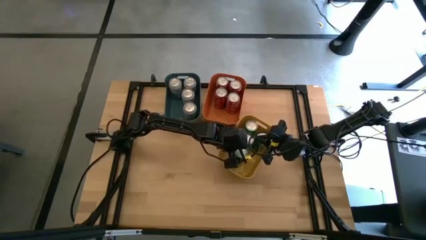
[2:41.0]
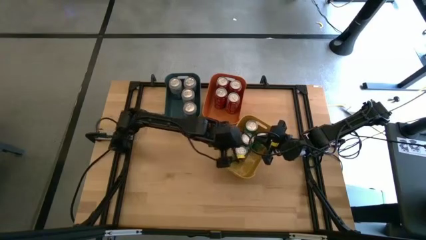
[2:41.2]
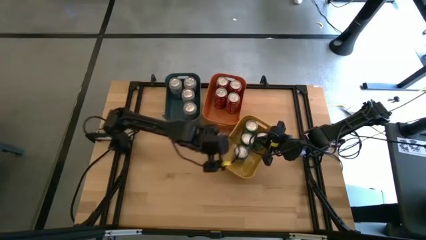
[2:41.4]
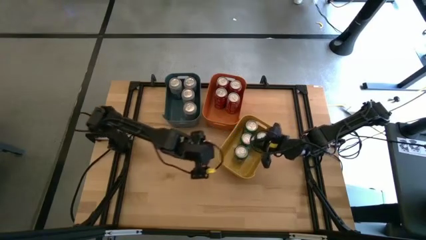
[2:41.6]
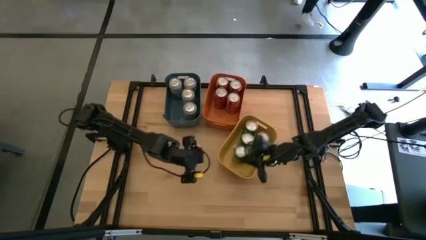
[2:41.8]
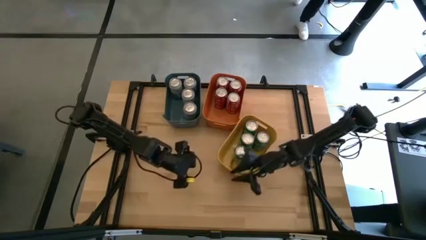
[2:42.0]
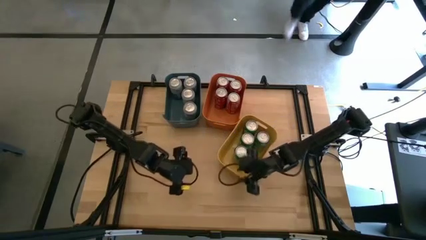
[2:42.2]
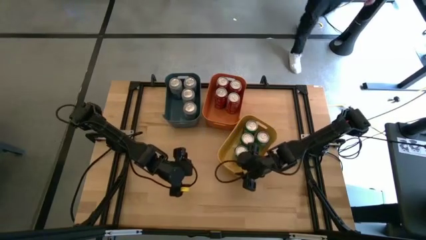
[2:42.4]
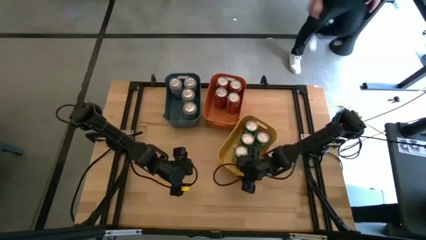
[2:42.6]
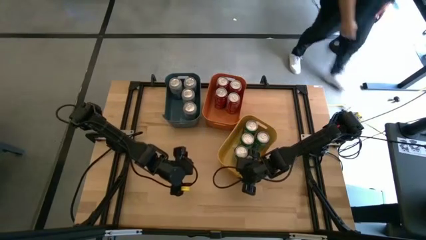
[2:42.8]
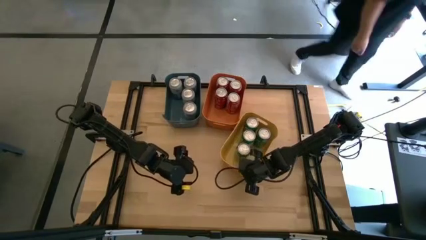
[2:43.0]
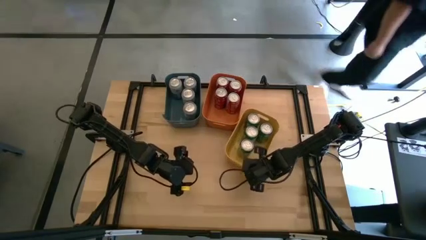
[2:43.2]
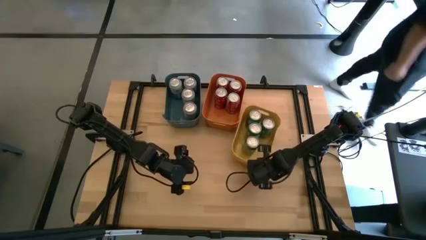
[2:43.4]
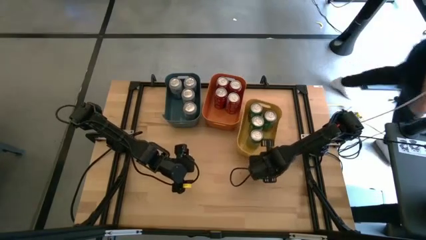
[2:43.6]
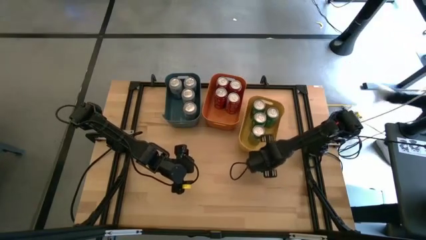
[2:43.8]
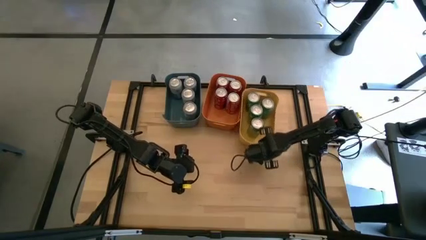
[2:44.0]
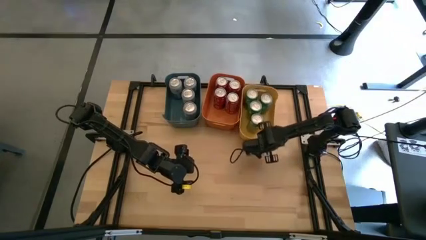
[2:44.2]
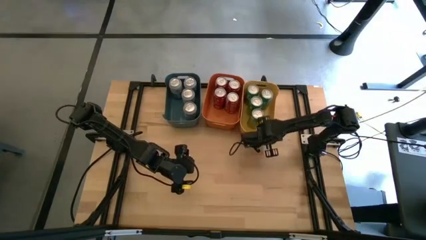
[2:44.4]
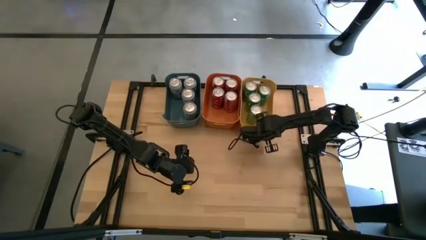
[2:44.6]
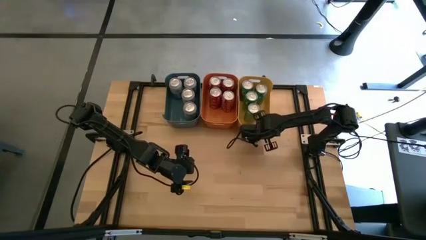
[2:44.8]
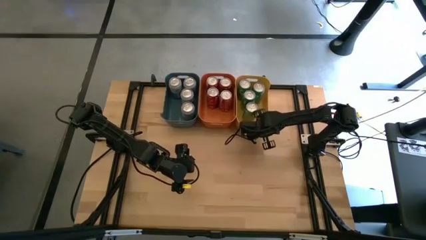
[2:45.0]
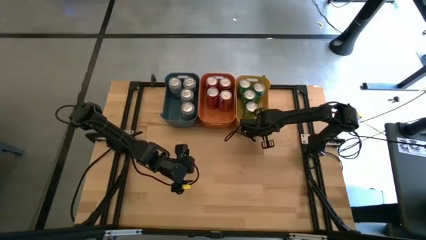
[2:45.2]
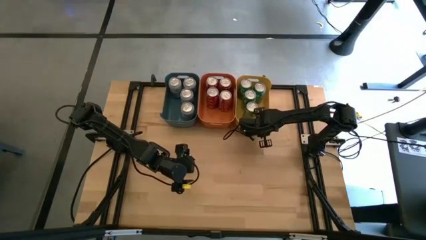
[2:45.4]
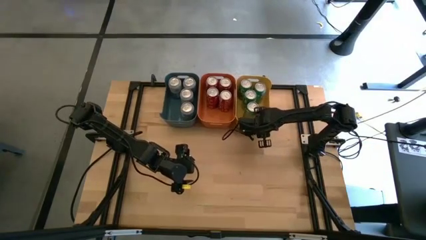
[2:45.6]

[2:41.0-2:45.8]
Task: Sort soda cans
Move the yellow bin to the right of the orange bin

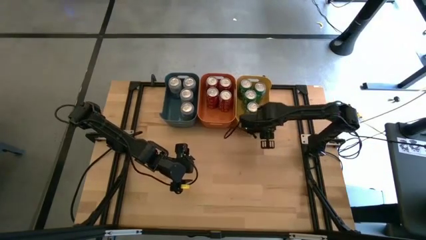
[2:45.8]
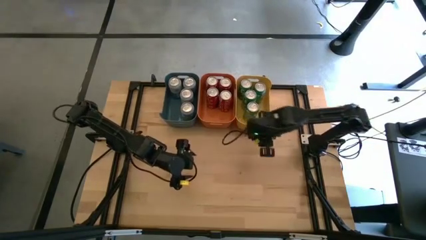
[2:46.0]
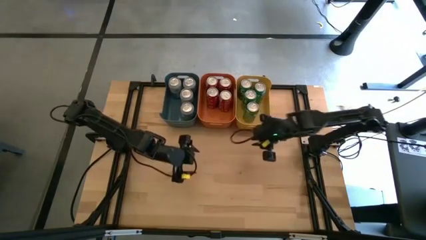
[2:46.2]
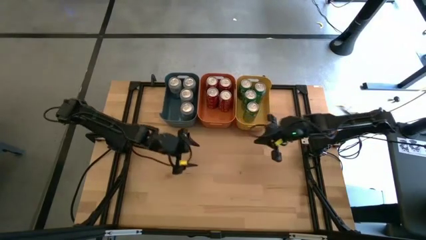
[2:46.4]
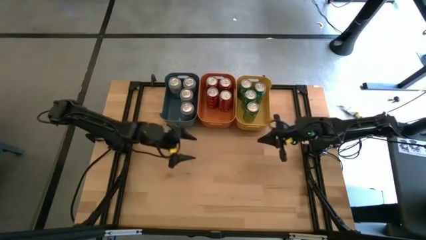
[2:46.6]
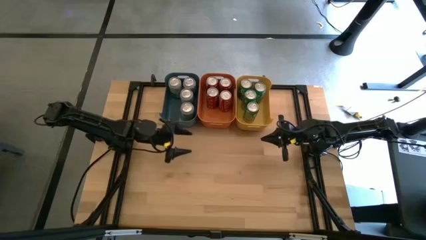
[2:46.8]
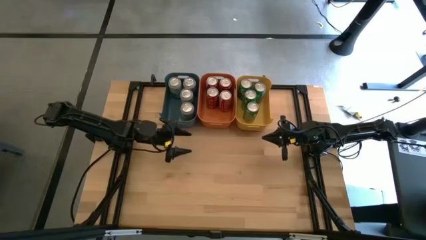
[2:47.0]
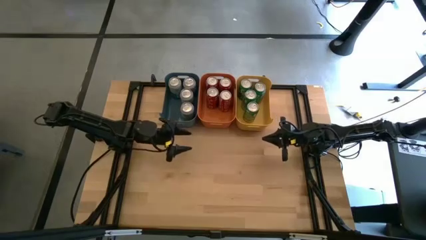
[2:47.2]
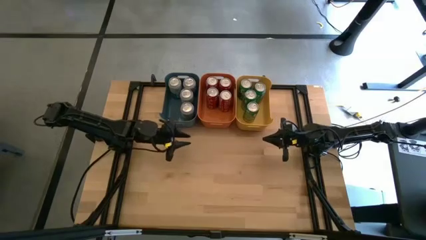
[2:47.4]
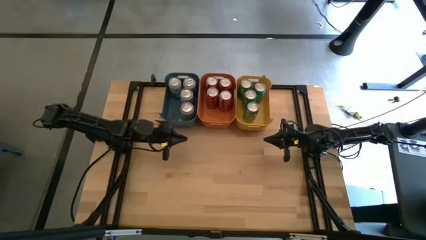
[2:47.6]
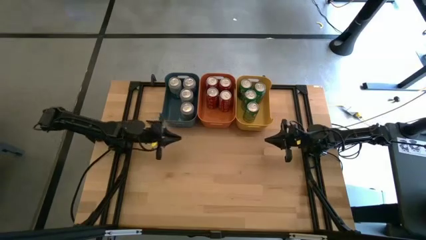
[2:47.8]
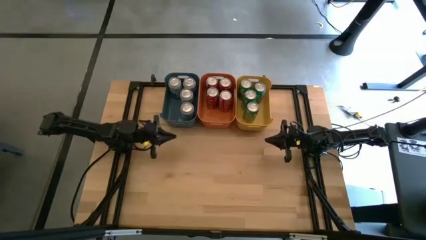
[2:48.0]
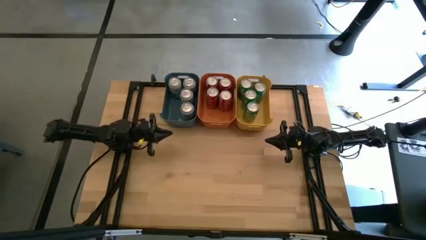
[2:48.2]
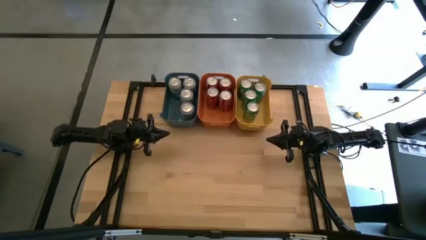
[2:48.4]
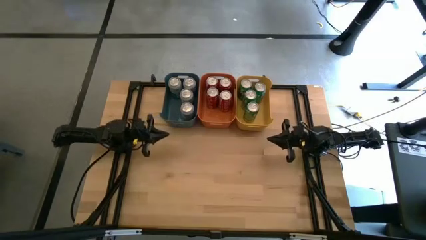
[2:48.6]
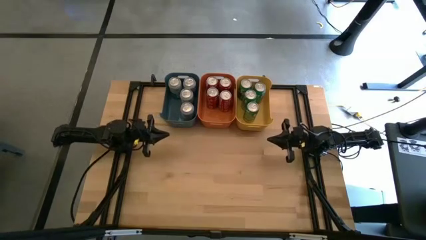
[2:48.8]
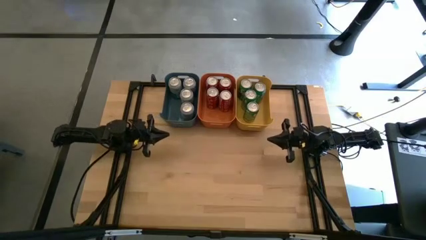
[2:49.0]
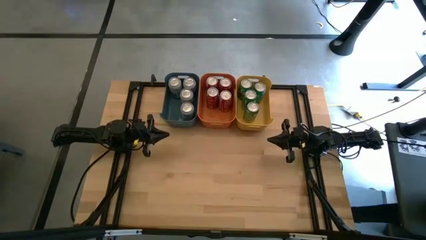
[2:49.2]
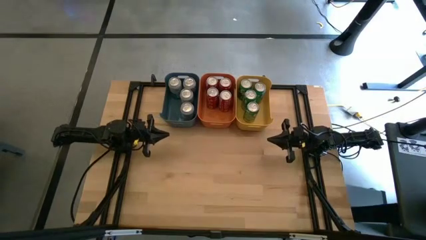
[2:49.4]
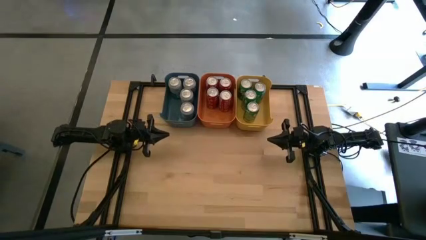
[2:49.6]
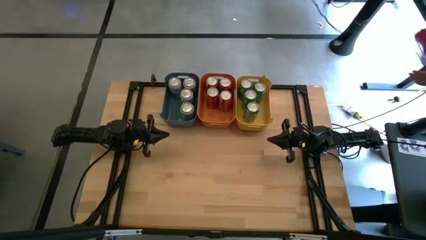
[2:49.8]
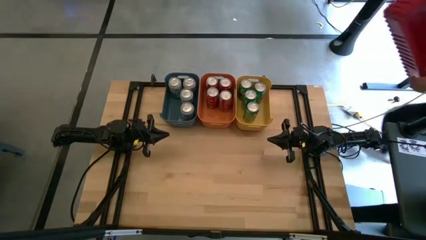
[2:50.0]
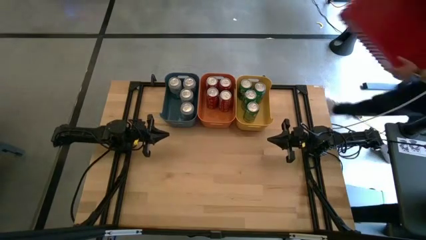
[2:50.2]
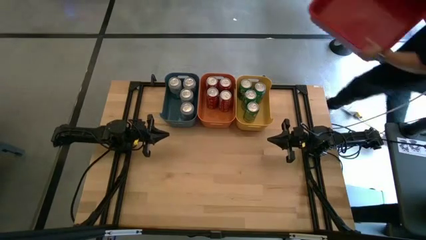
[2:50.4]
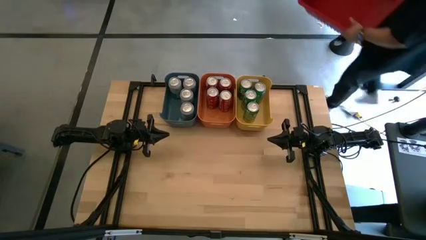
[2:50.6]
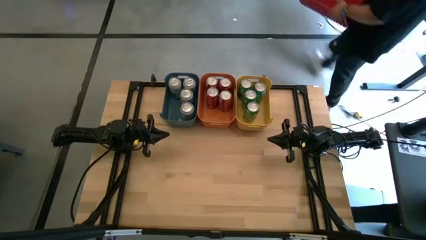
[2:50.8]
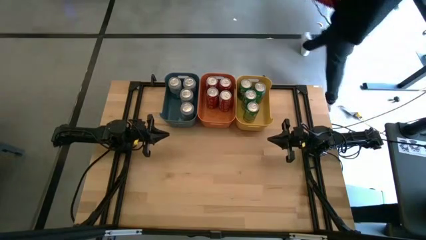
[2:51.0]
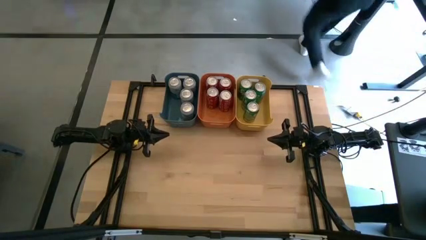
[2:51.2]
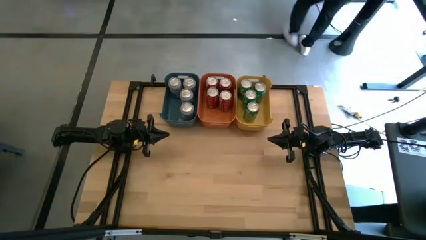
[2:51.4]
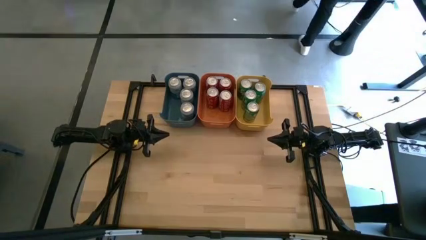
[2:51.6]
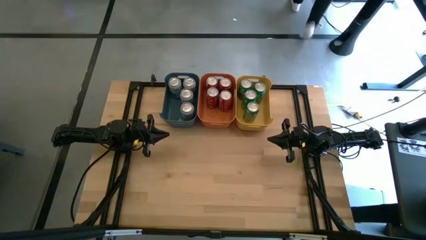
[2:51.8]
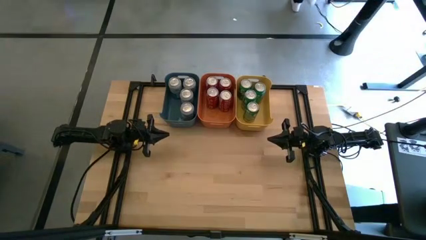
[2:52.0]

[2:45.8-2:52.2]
Return to Home Position

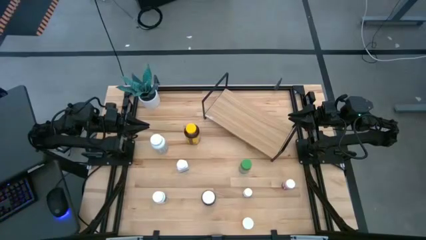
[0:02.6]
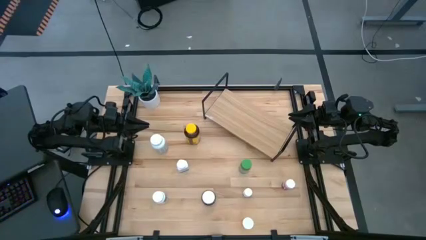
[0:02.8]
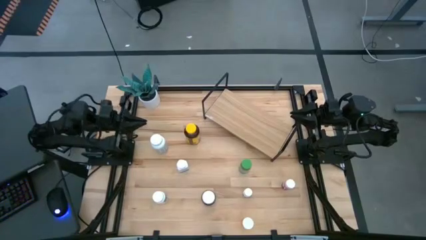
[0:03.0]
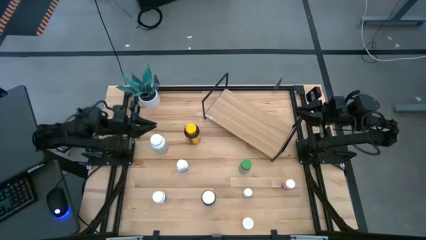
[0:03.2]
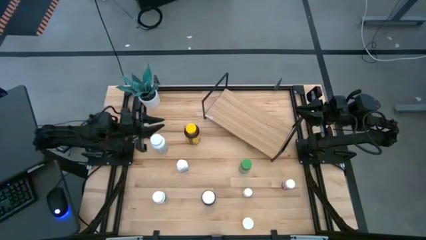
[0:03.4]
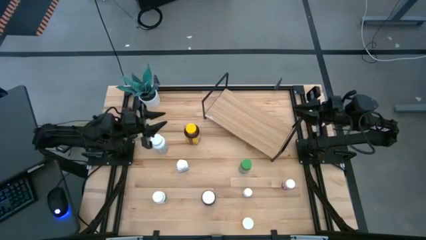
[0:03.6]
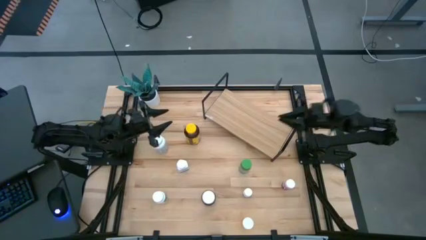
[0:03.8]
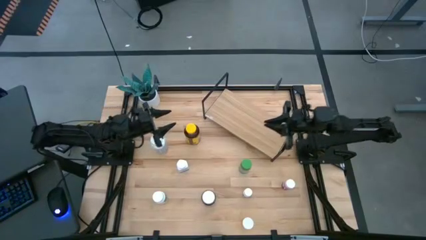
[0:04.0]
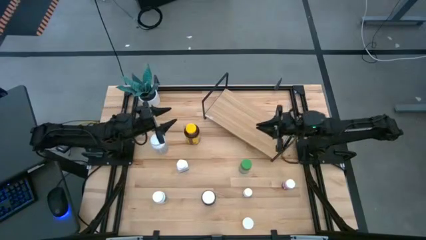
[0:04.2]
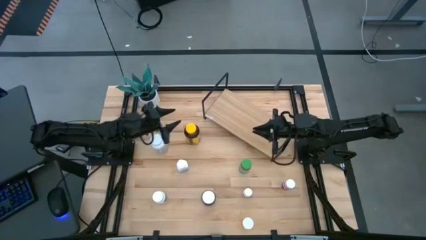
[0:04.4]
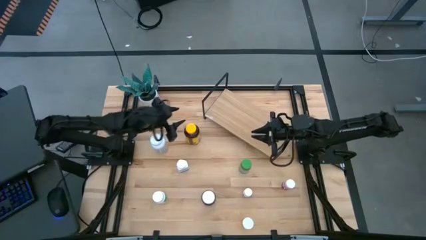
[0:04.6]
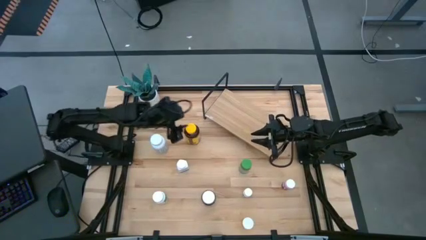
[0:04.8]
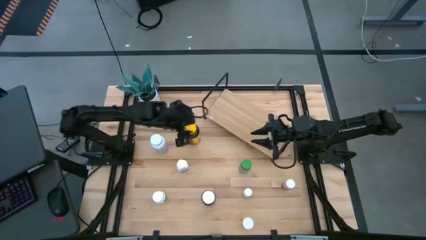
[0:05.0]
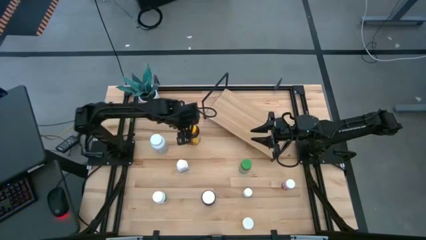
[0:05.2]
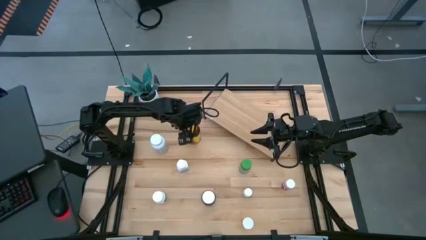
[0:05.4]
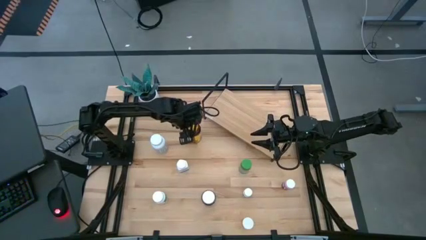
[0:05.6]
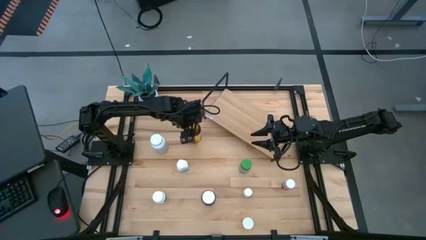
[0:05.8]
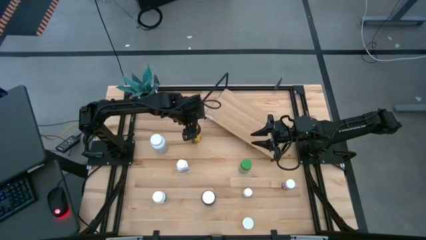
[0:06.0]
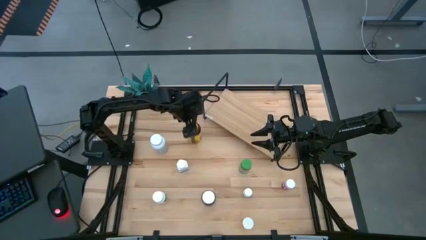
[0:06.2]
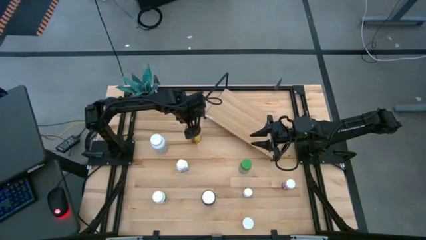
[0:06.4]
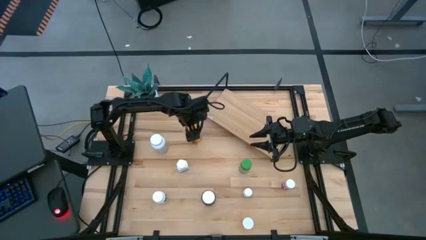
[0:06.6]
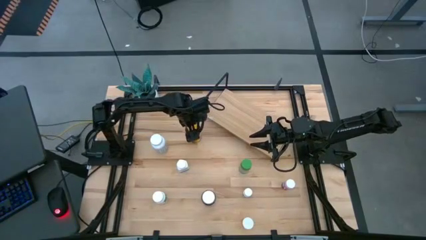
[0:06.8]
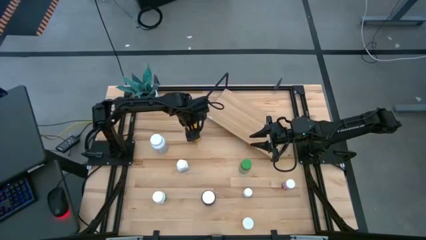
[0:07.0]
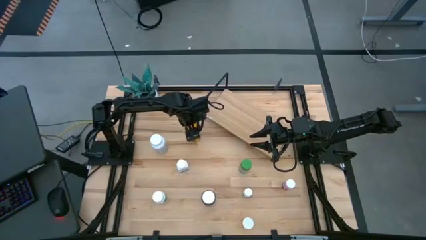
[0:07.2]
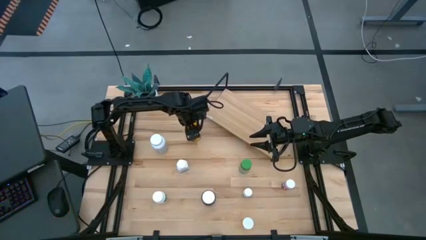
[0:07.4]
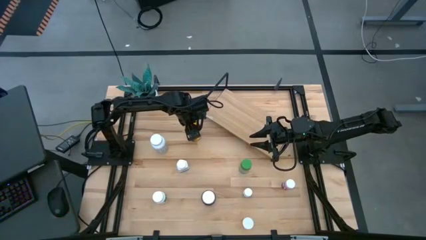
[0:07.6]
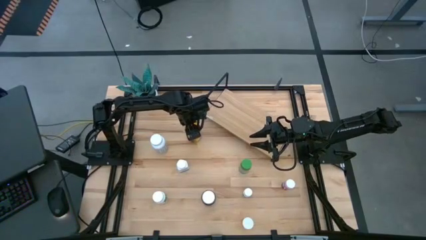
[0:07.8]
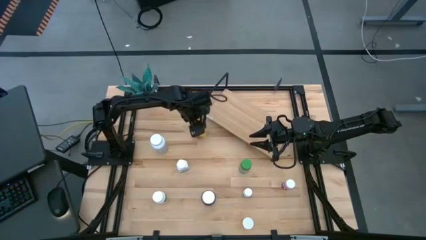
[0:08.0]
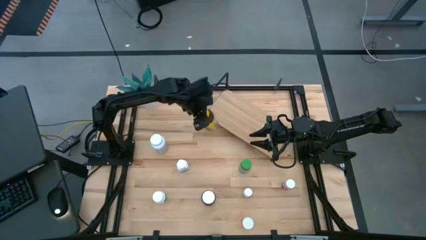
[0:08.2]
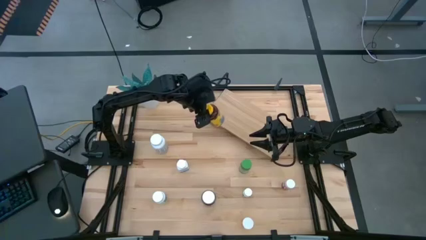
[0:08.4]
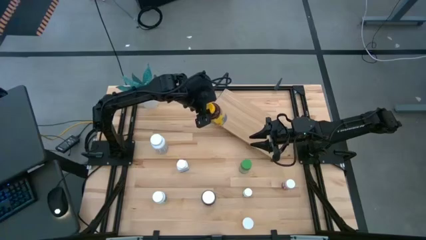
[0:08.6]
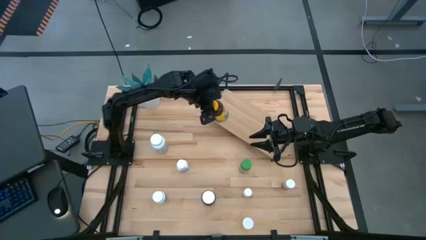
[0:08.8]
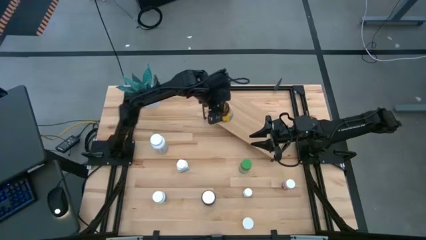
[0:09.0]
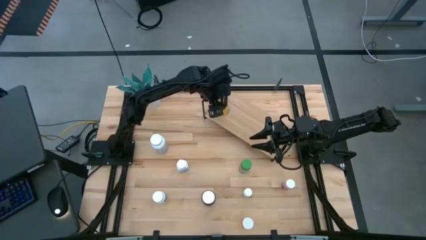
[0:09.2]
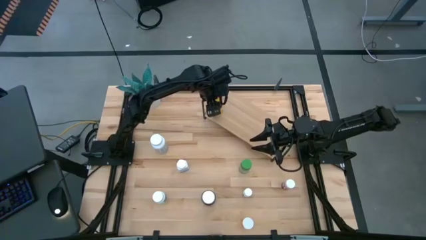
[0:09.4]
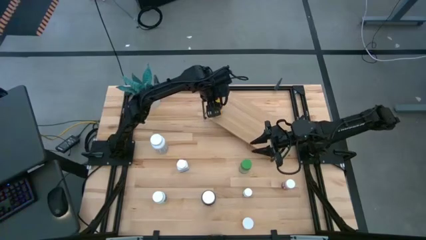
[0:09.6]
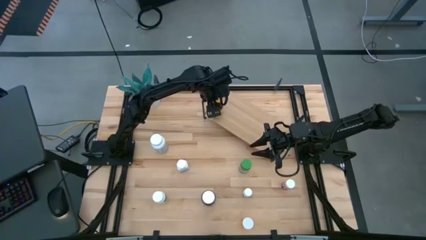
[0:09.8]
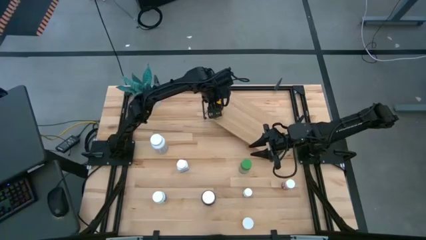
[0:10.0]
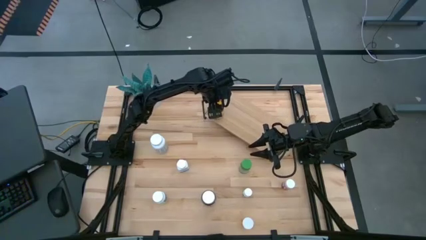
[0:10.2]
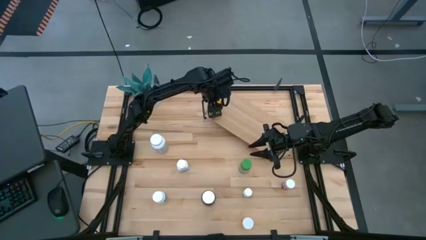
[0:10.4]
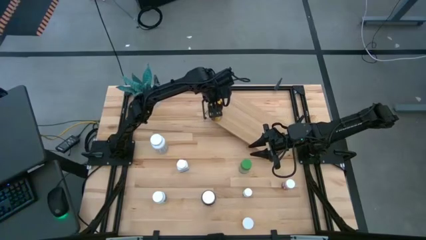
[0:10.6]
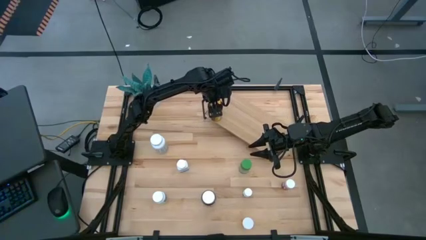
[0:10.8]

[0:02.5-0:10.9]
Task: Pick and place medicine bottles onto shelf by color
Put the yellow pill bottle on the shelf
